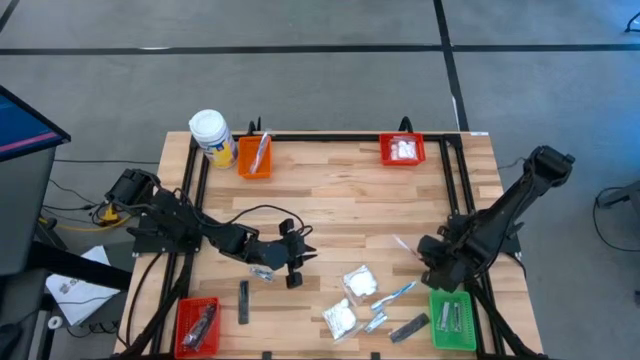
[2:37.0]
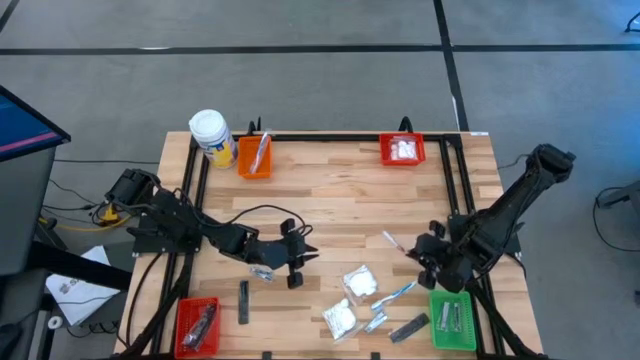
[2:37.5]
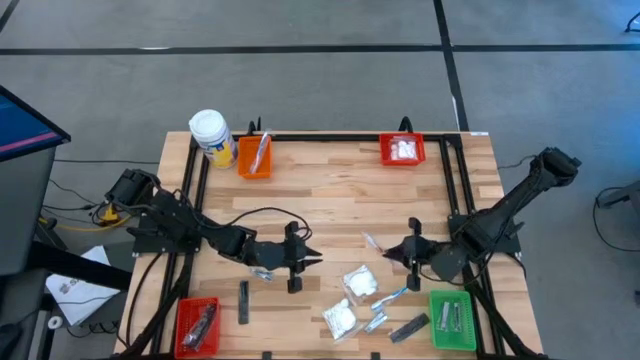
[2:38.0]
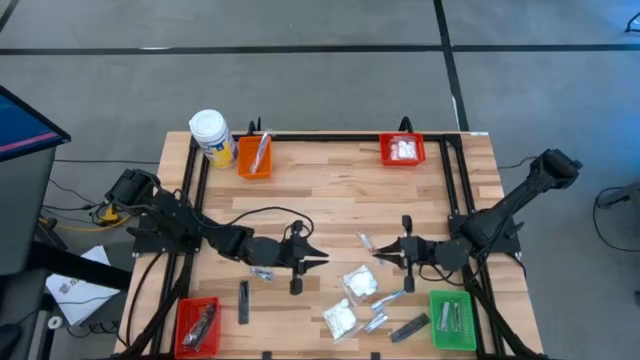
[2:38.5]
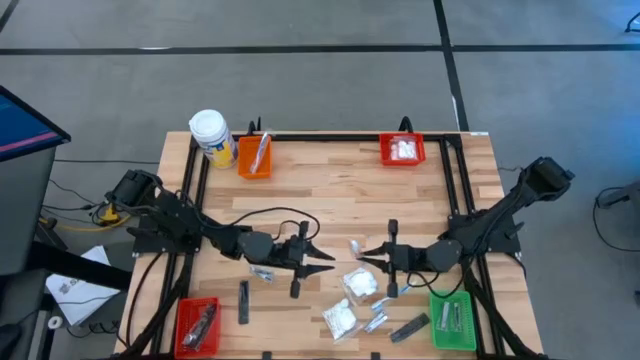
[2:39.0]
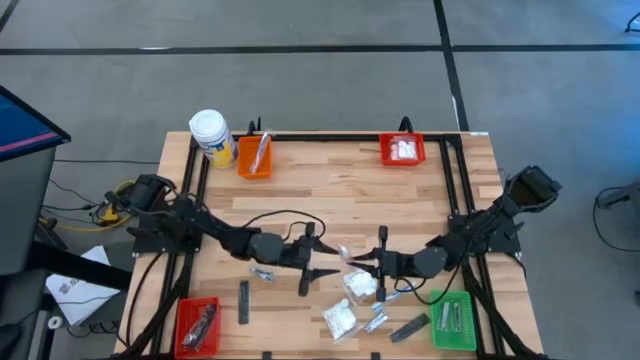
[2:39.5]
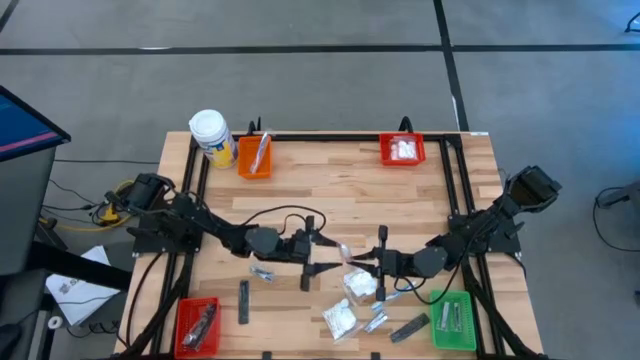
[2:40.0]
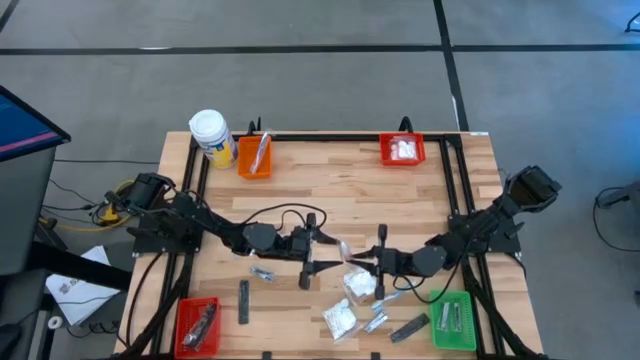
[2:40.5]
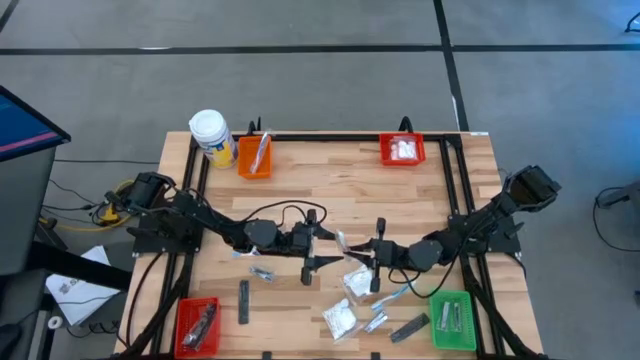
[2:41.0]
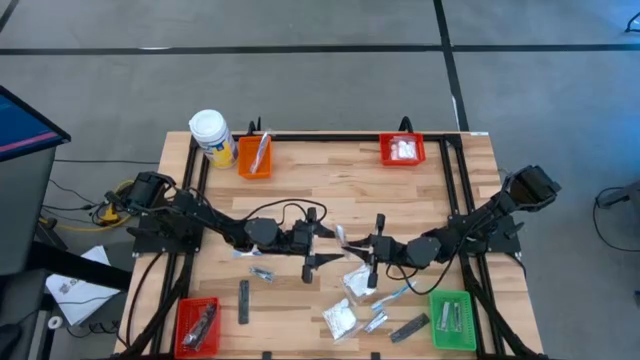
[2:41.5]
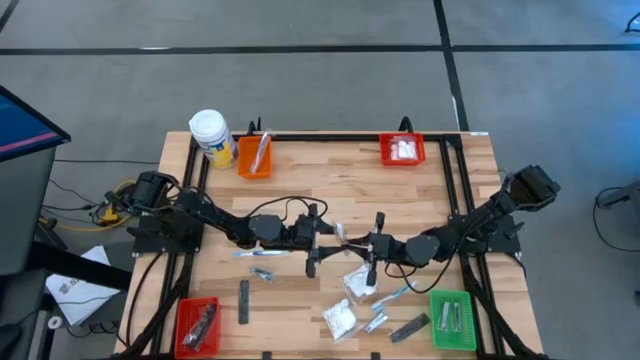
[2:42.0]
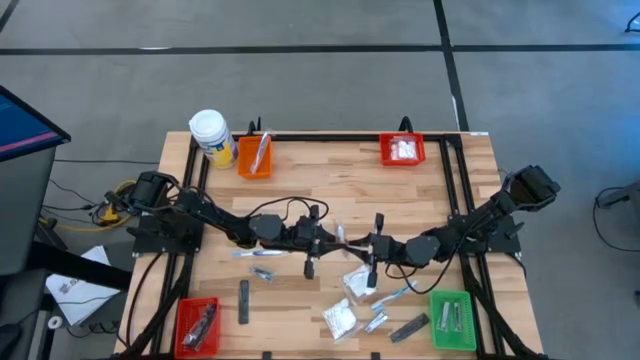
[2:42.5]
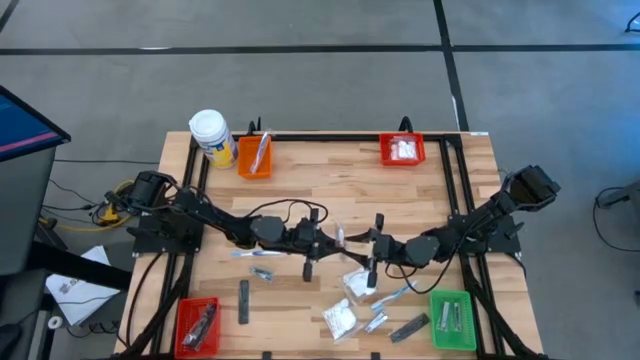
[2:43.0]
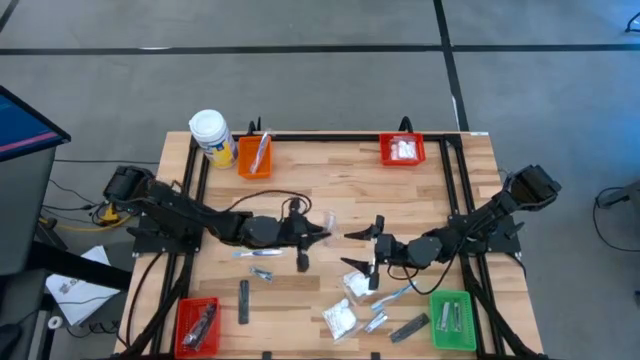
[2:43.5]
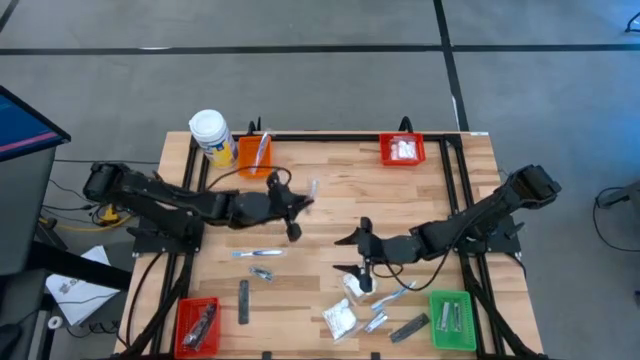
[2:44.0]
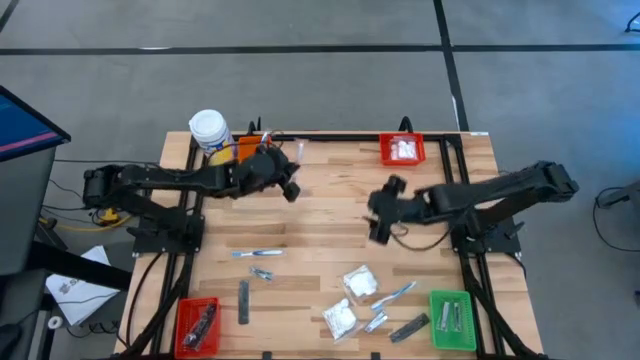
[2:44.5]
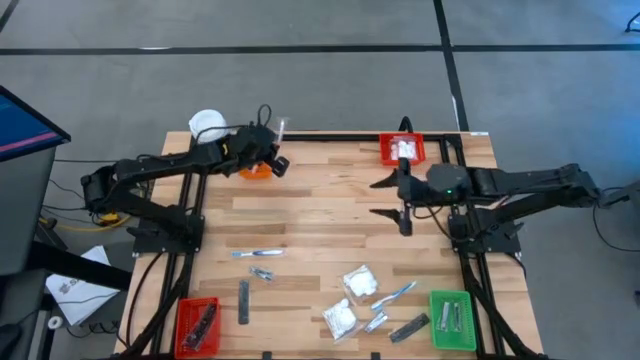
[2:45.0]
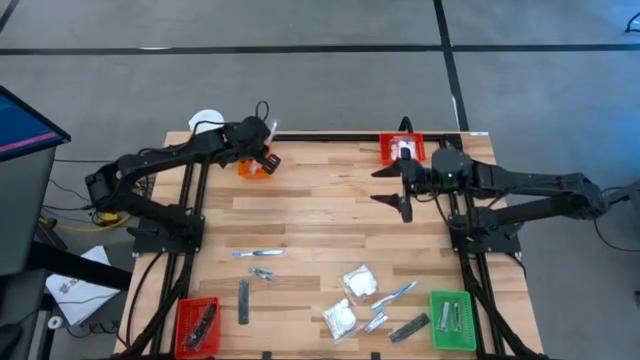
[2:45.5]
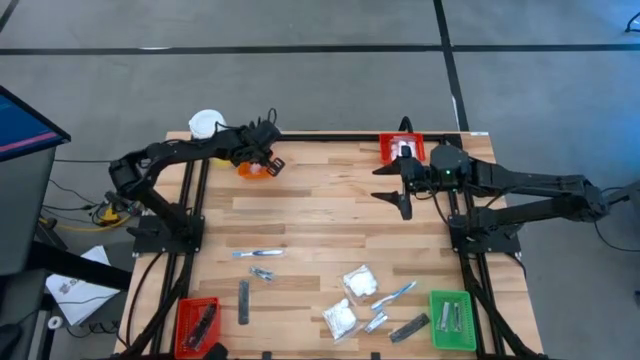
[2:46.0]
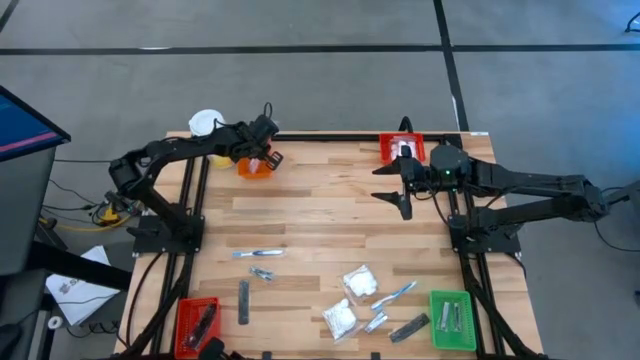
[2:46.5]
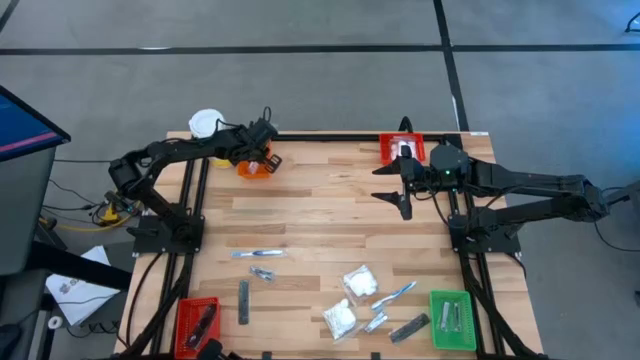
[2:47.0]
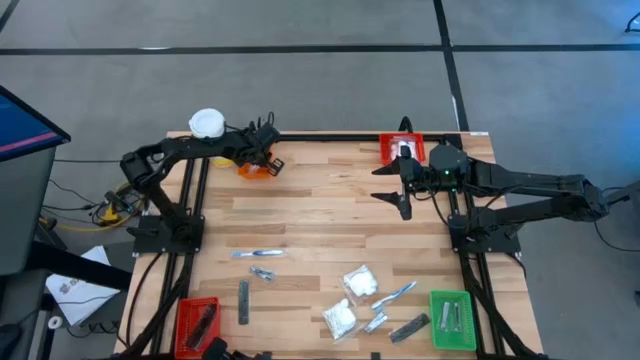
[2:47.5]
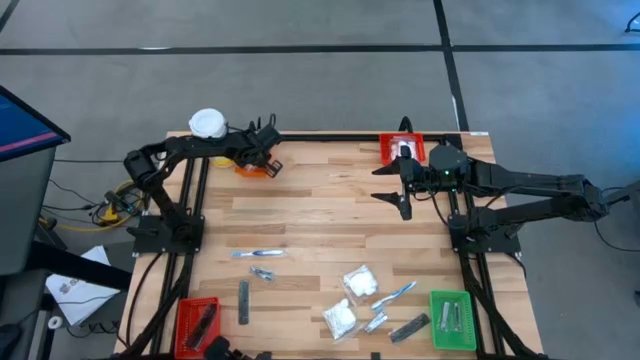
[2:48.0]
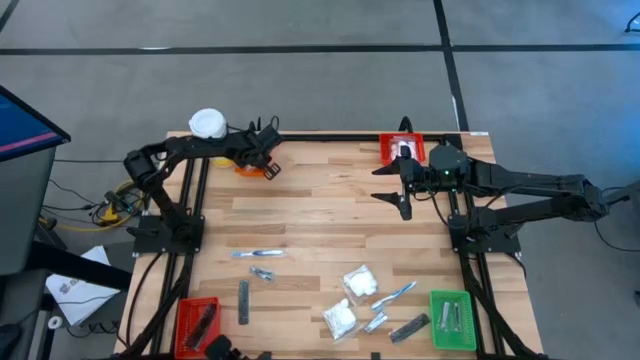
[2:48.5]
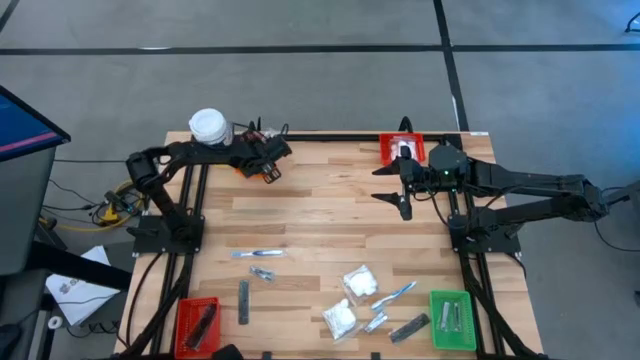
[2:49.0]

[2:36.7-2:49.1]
Task: Pick & Place Travel size toiletries
Put the right red toothbrush into the orange bin

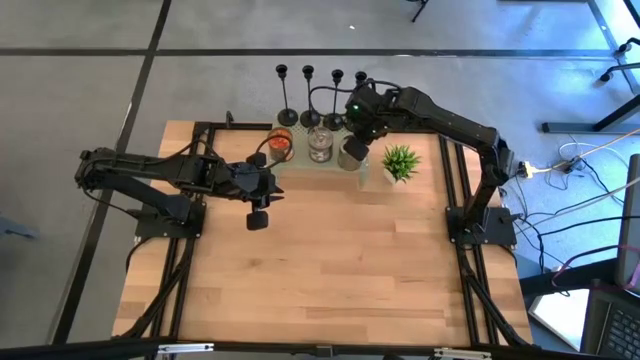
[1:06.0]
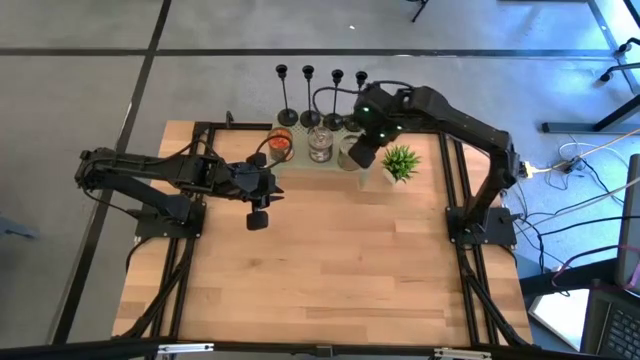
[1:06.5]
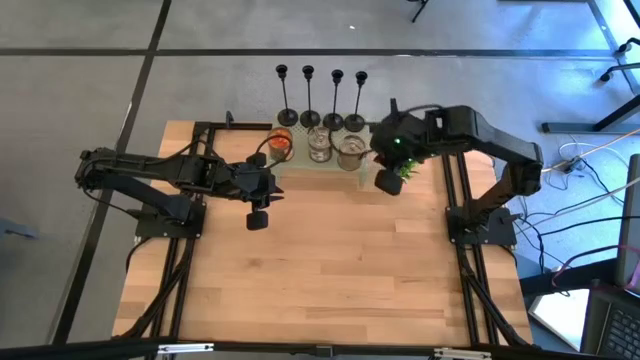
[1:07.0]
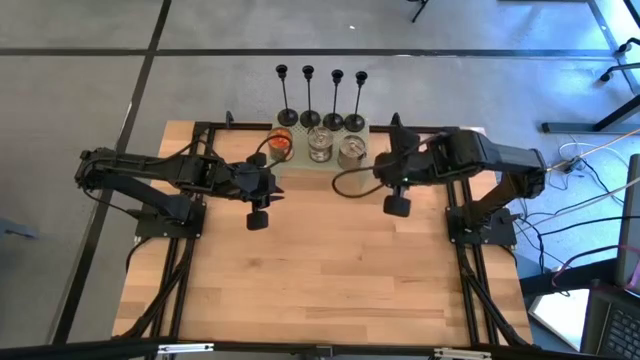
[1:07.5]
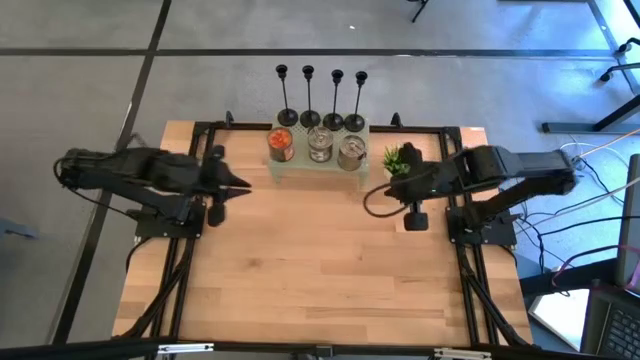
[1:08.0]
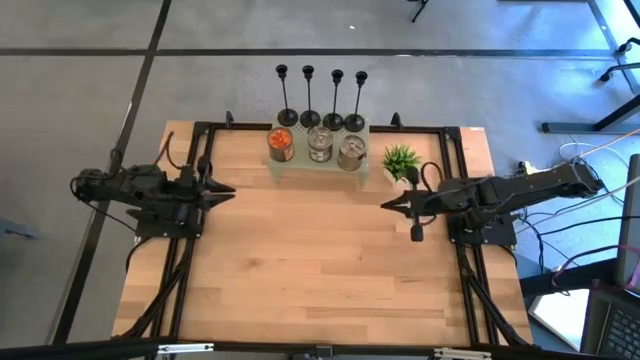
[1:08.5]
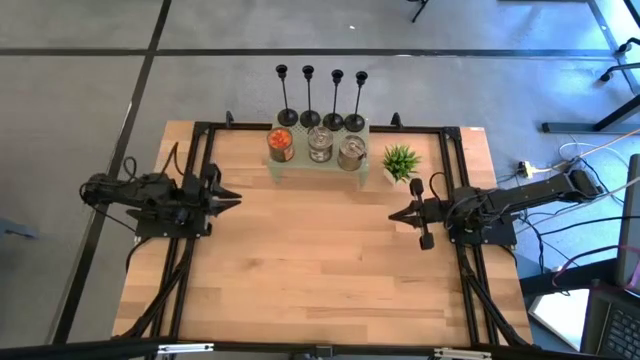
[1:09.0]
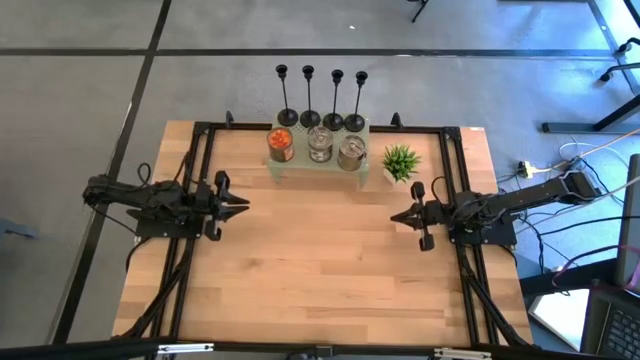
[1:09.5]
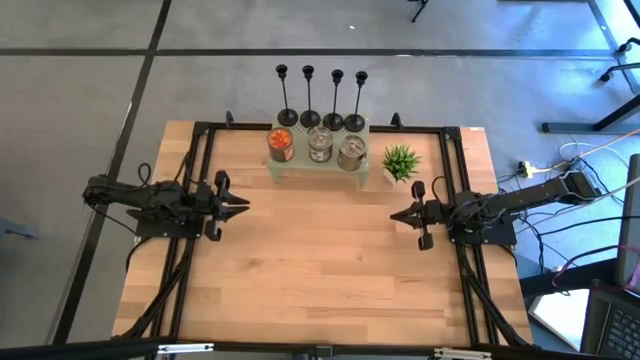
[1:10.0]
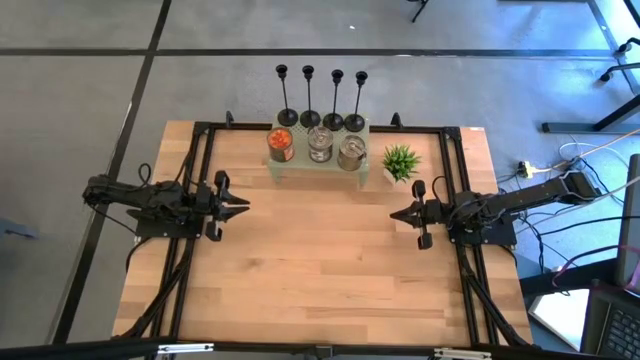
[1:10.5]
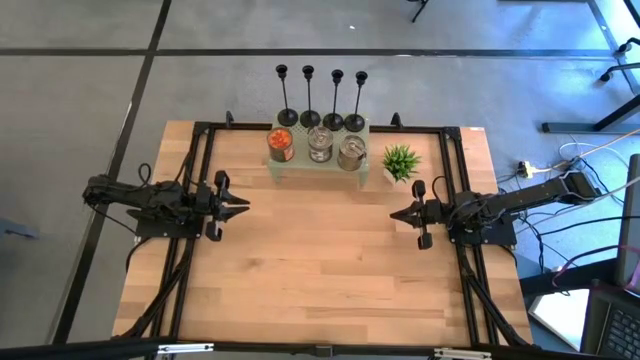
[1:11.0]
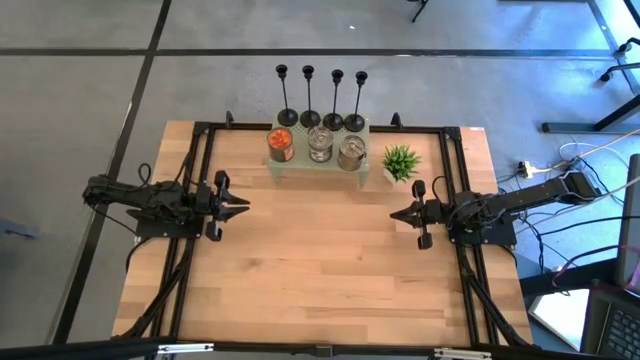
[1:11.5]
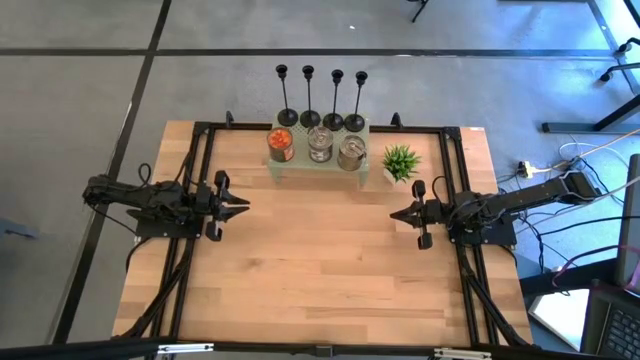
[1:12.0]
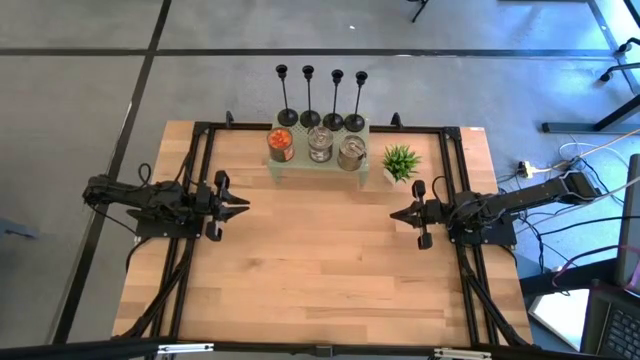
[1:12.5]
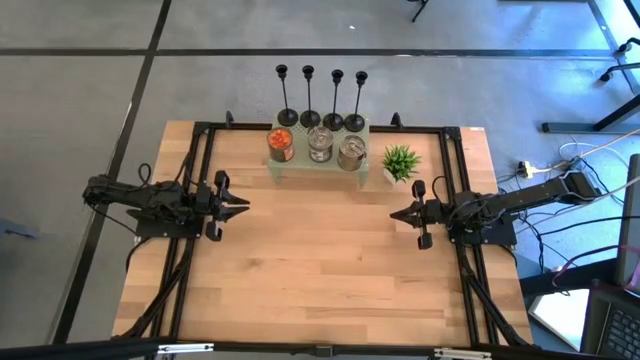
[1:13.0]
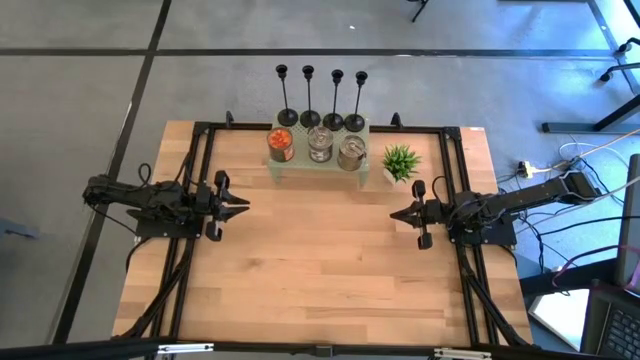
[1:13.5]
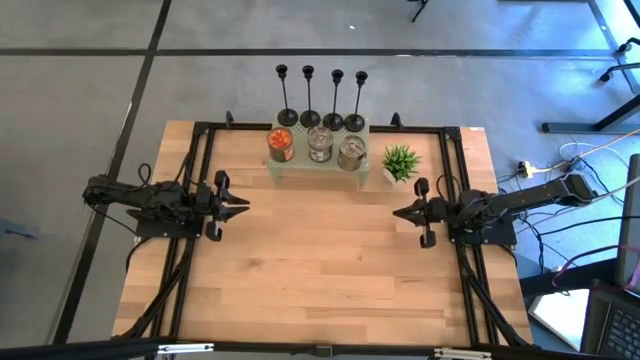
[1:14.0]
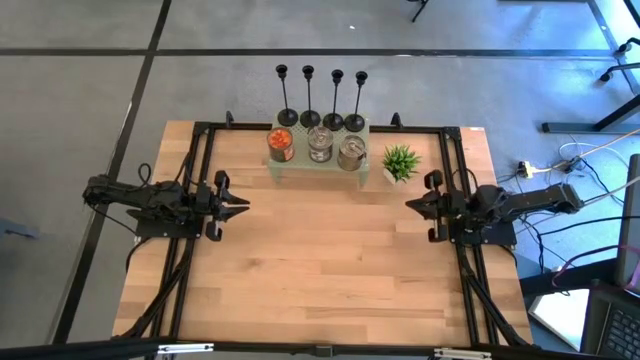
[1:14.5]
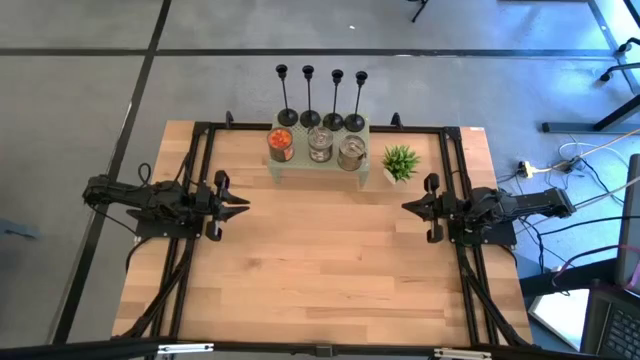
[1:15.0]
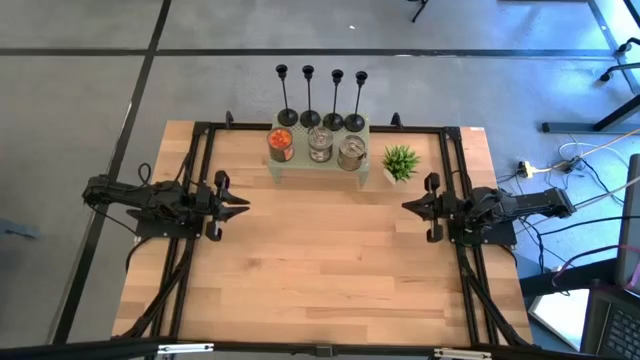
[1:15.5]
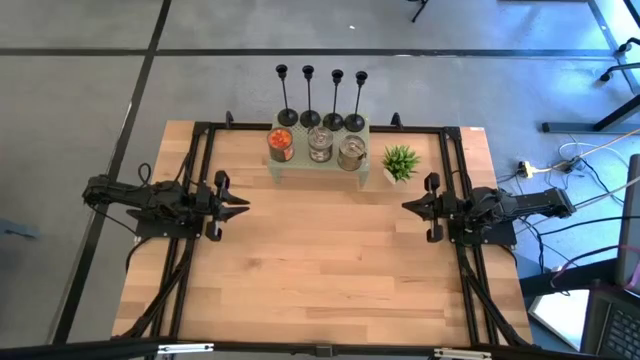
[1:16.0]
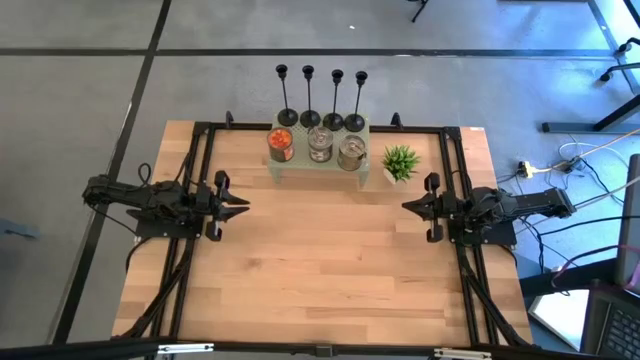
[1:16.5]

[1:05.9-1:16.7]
Task: Pick & Place candle stick holders
Return to Home Position
